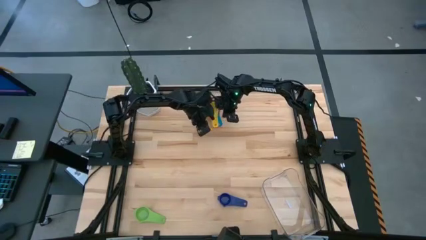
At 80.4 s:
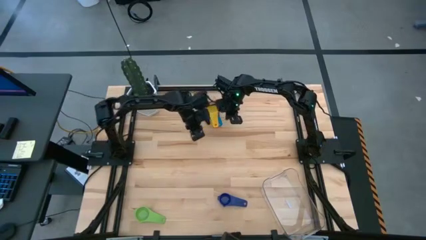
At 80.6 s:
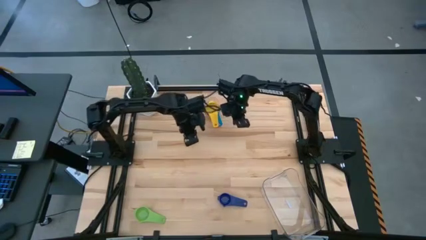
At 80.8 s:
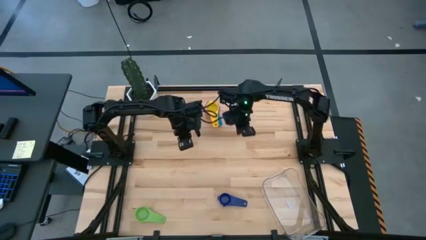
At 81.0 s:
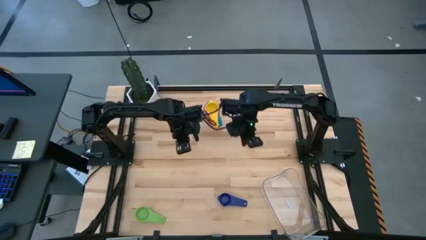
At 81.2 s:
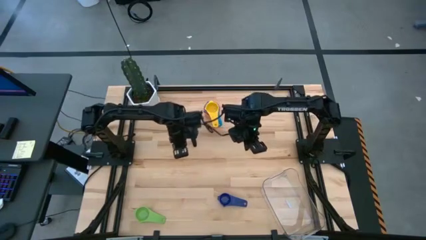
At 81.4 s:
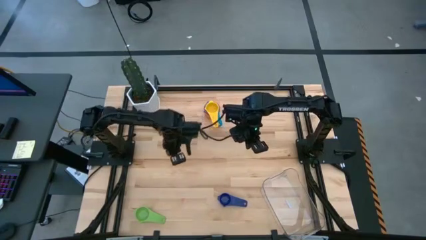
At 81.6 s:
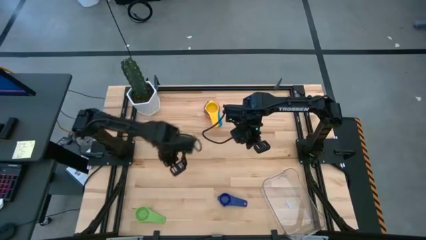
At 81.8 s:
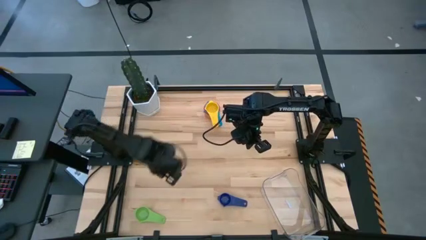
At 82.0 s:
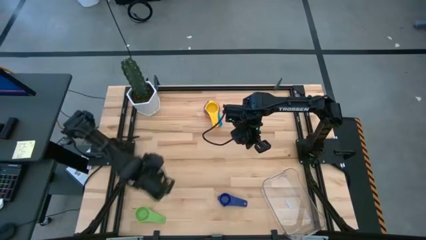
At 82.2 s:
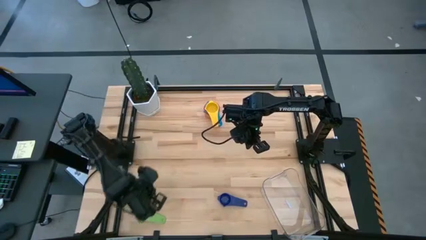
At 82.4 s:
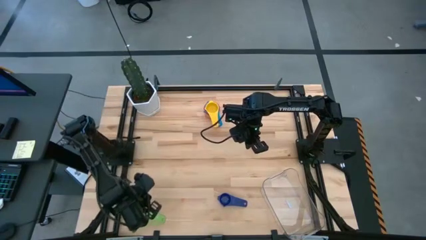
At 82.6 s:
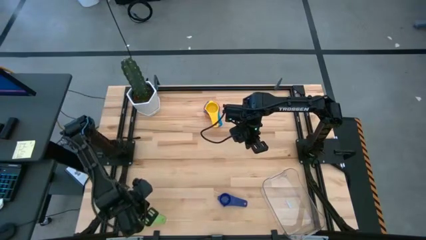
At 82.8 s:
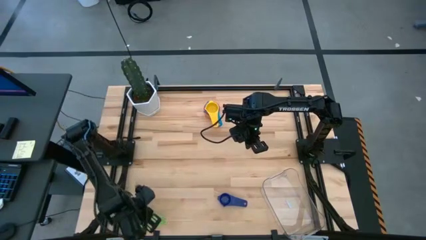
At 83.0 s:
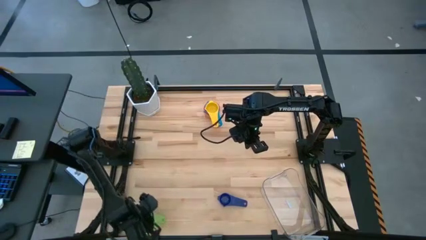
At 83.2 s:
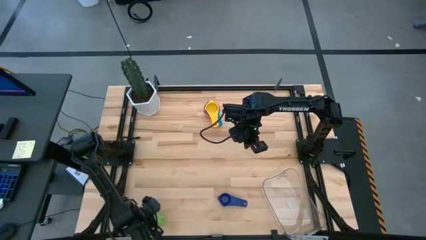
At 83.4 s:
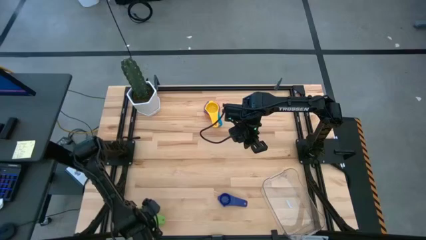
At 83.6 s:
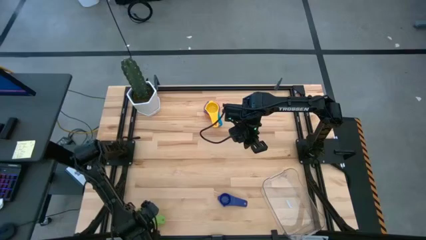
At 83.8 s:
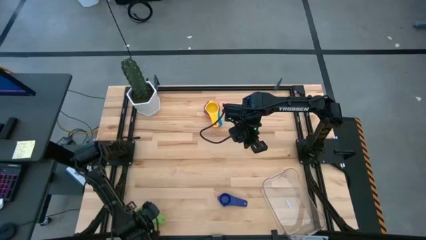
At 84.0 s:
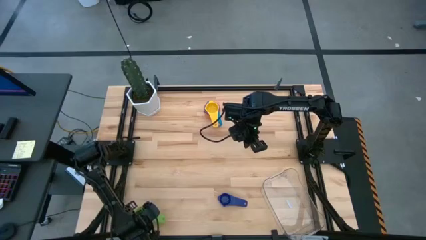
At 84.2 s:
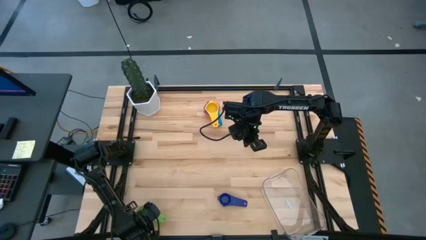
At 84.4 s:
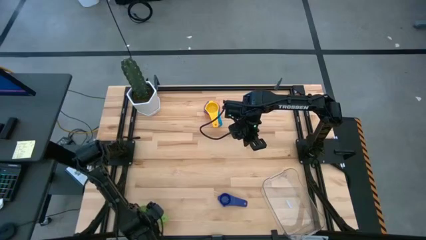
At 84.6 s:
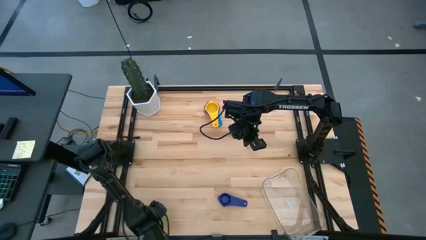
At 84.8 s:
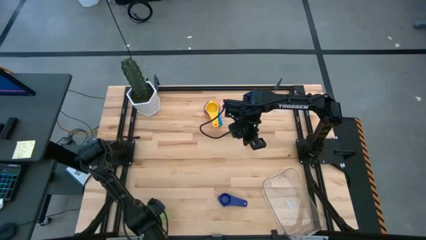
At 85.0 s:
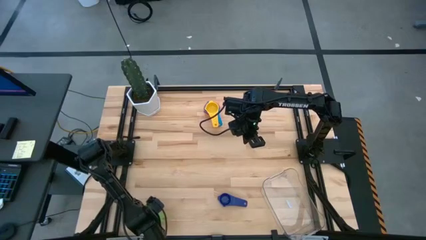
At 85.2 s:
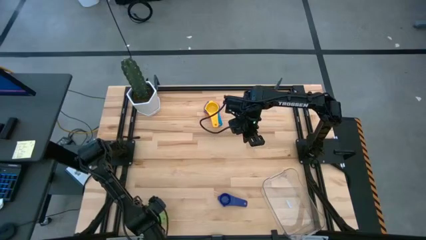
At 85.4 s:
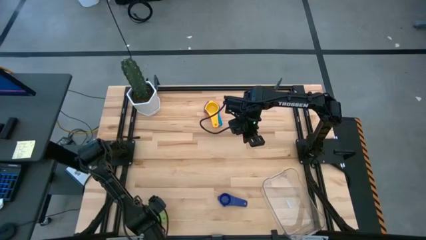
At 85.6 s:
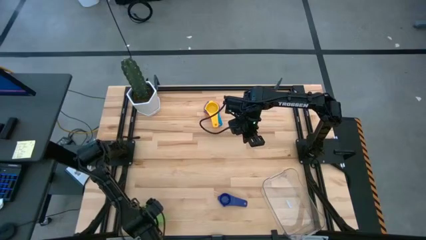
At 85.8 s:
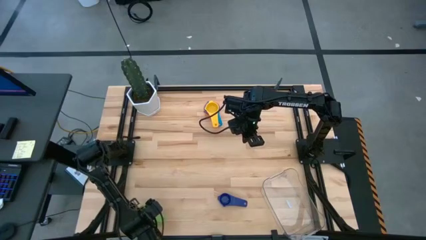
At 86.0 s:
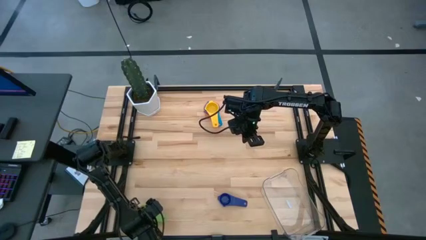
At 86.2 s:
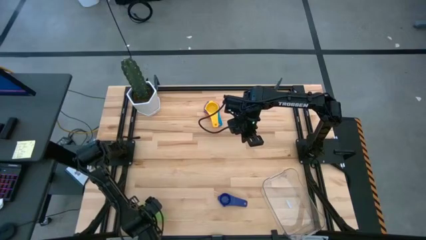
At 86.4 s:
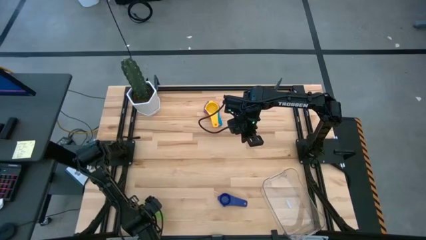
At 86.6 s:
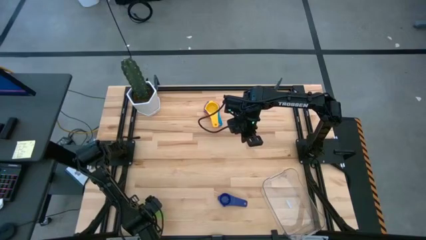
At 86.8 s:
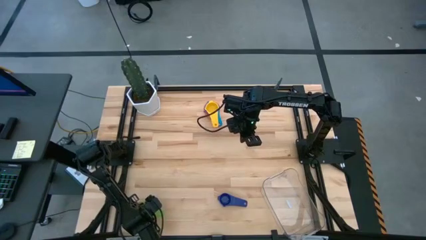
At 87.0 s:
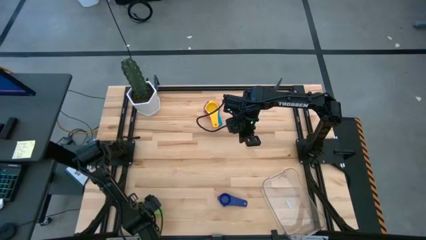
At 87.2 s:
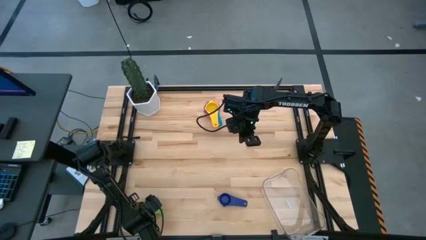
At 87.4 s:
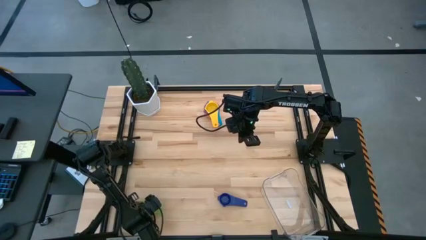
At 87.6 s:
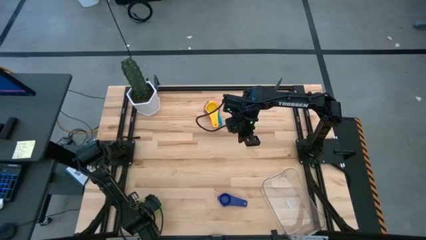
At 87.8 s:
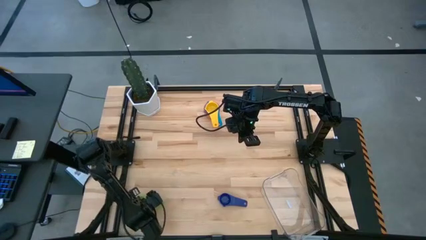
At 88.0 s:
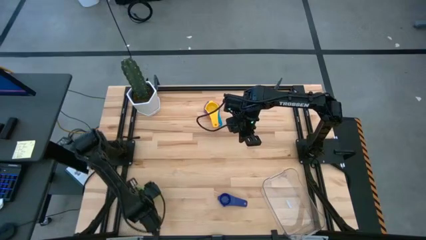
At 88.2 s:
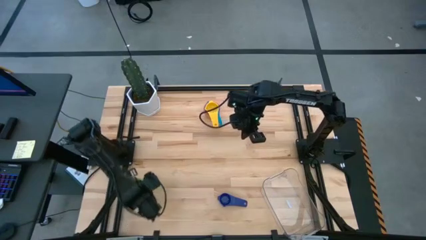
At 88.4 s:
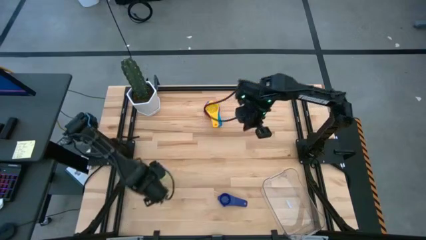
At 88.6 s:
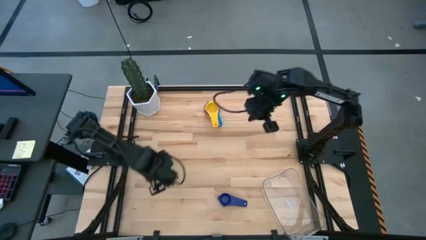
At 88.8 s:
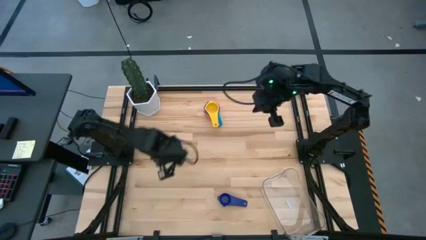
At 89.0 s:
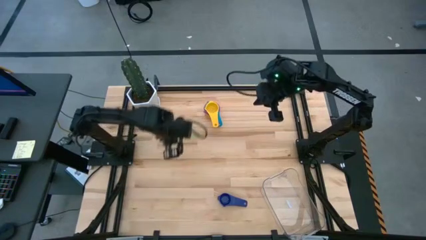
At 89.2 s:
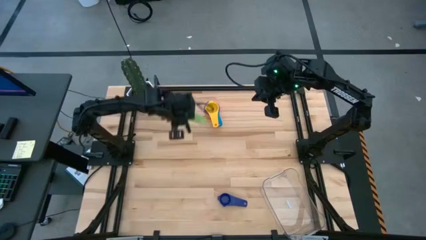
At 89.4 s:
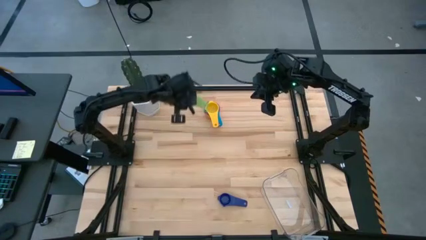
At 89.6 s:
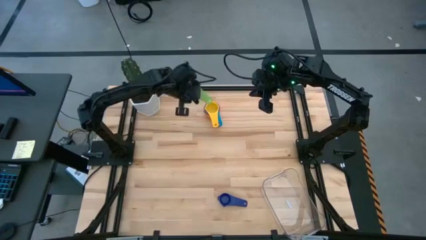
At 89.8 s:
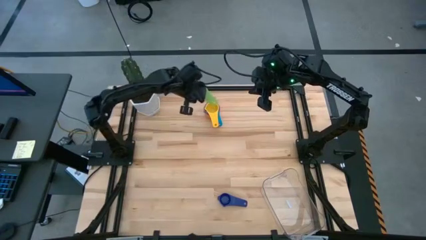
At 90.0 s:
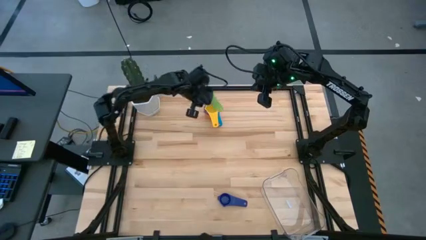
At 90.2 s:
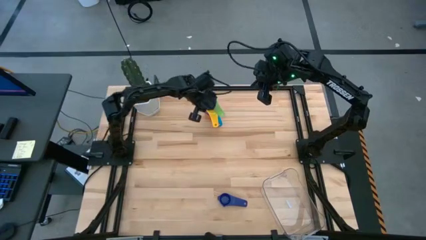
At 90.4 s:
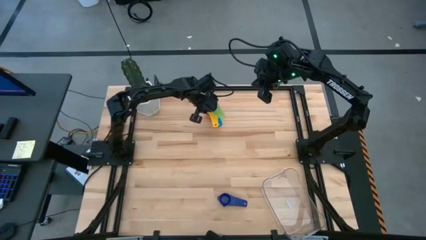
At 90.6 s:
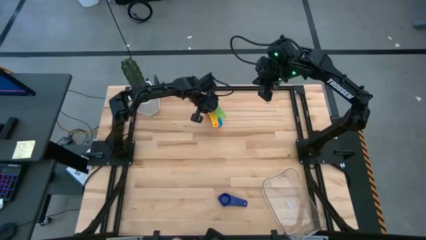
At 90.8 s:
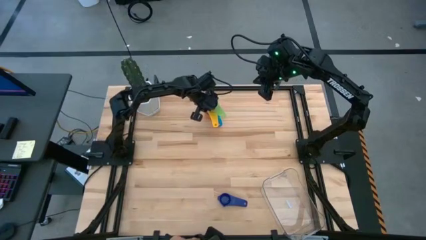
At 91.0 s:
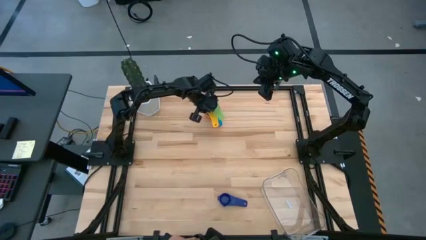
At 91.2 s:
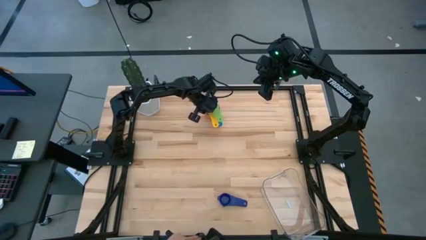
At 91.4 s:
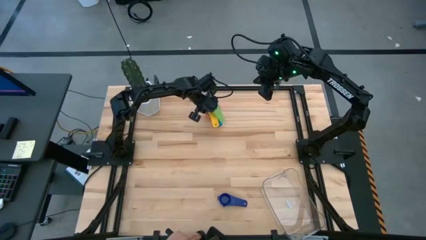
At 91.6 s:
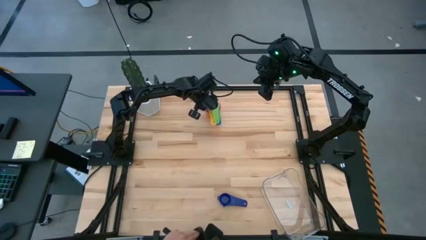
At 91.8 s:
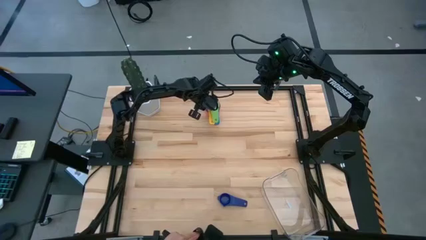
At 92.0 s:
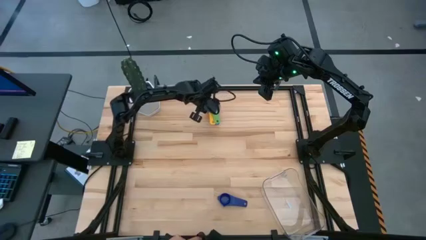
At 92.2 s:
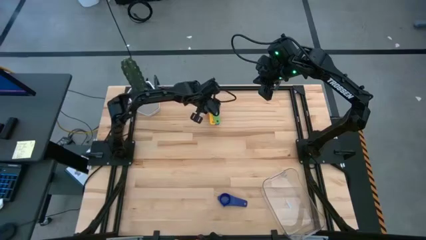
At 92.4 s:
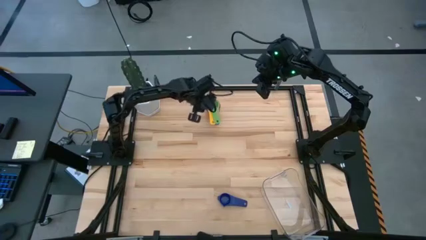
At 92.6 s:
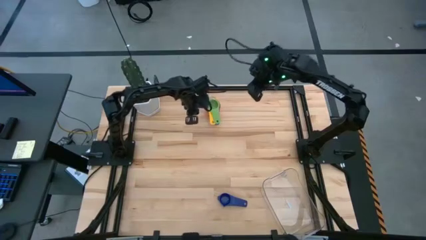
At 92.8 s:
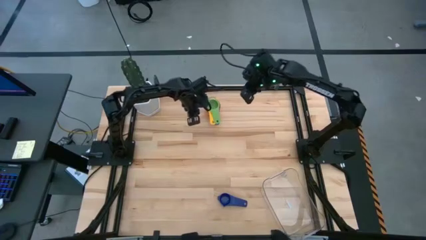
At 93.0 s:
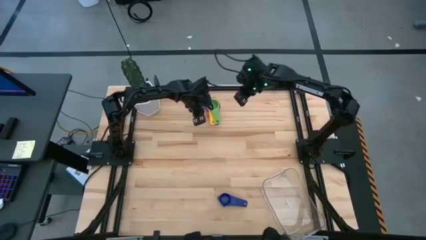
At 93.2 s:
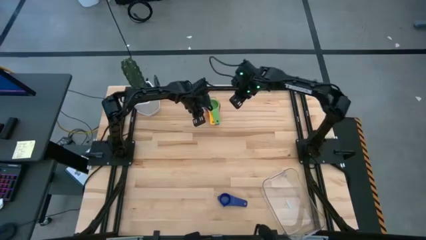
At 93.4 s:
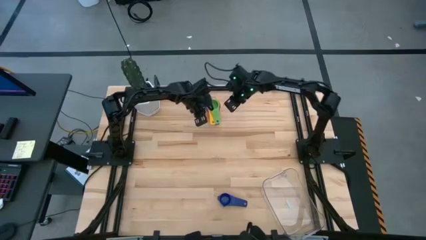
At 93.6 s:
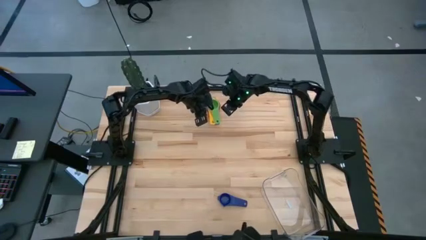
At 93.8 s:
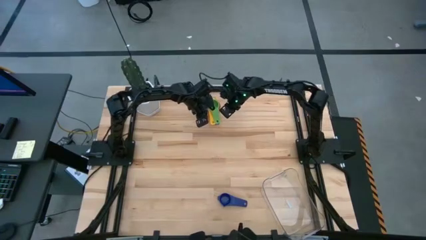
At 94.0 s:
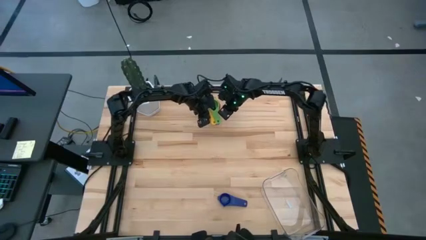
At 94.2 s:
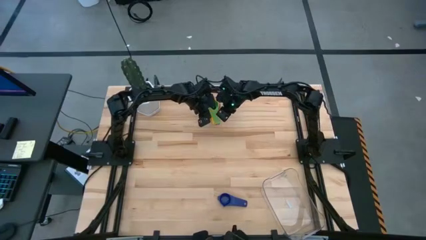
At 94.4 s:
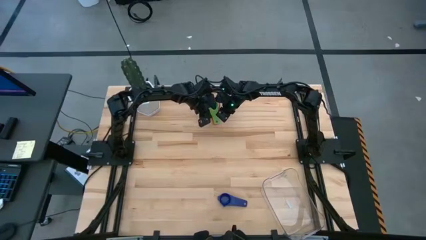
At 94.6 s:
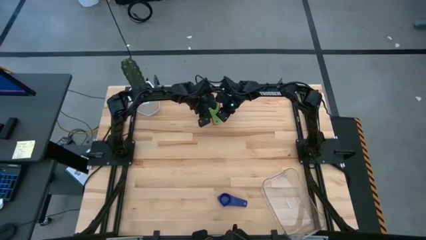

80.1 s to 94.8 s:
Task: Nest measuring cups in basket
Stack the green measuring cup on top of the yellow measuring cup
